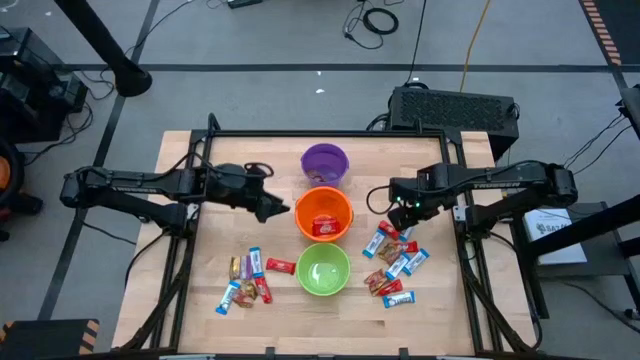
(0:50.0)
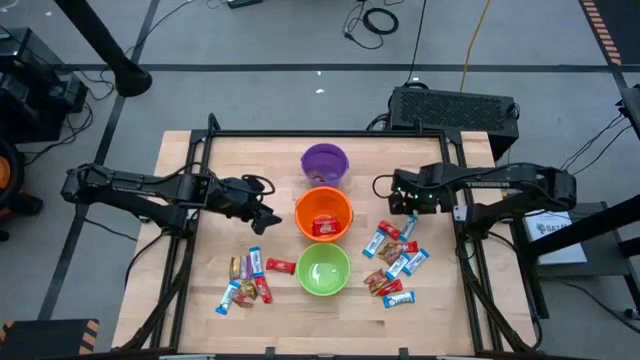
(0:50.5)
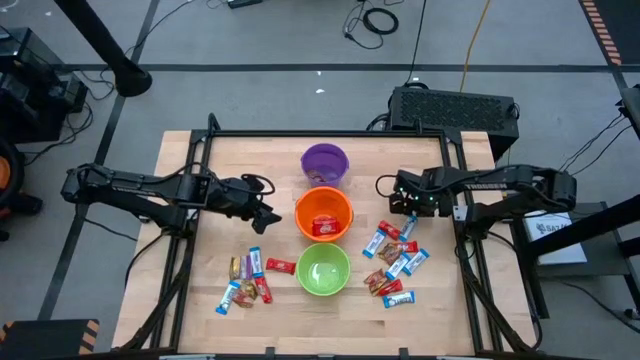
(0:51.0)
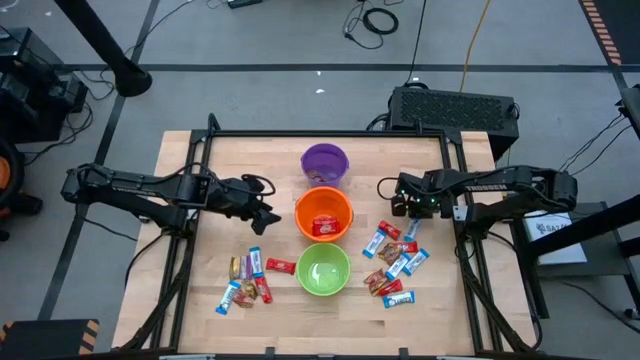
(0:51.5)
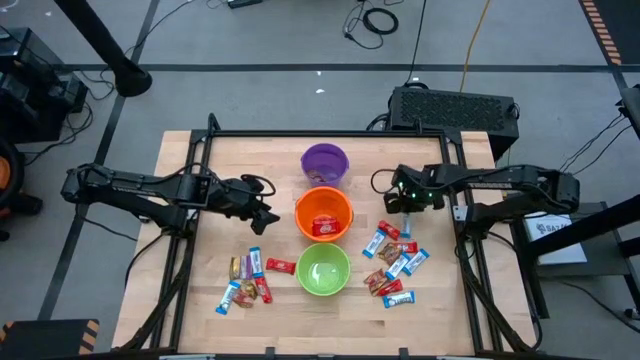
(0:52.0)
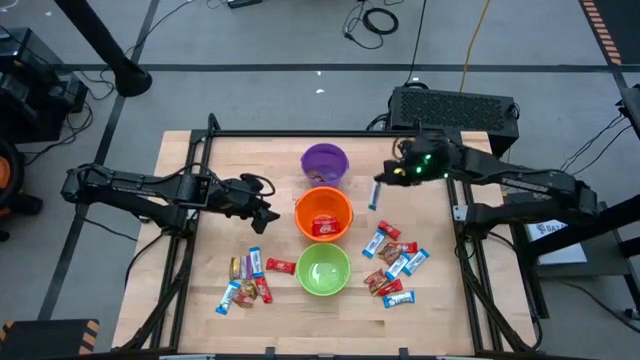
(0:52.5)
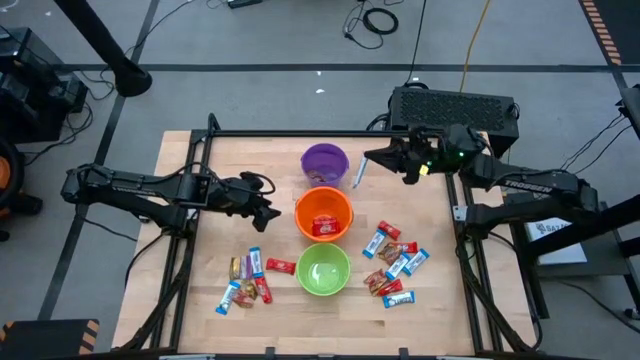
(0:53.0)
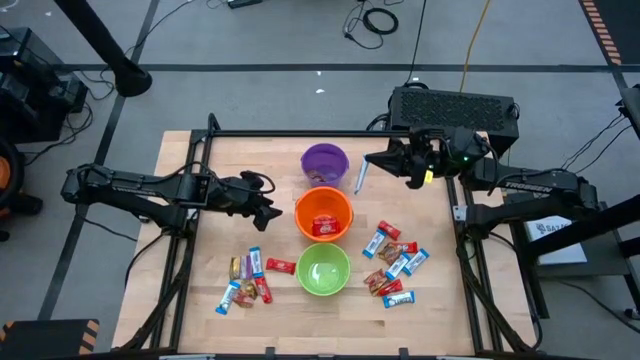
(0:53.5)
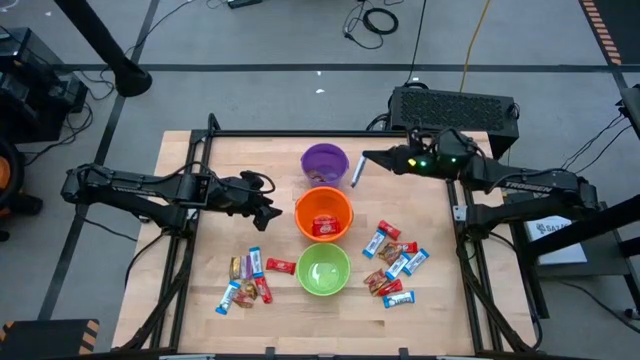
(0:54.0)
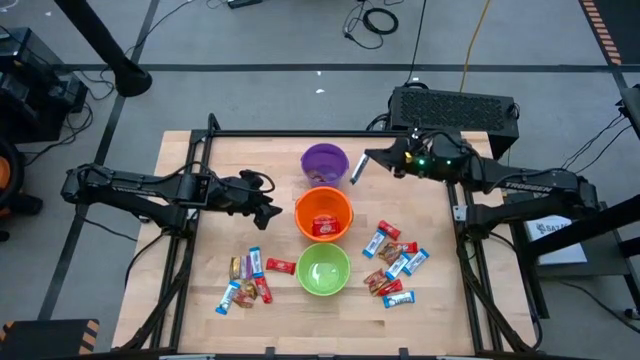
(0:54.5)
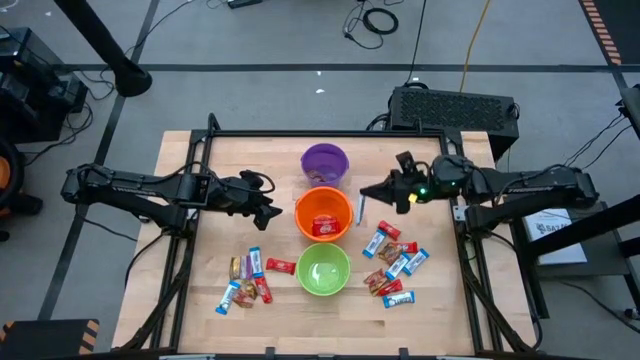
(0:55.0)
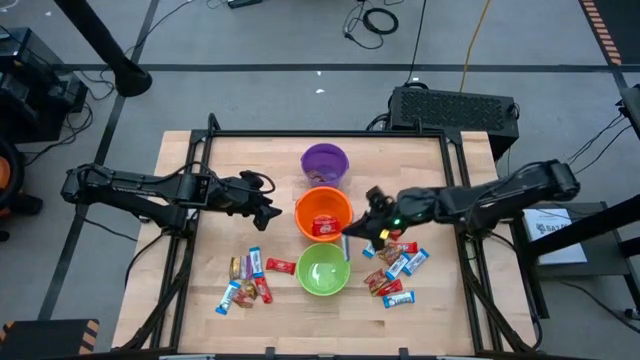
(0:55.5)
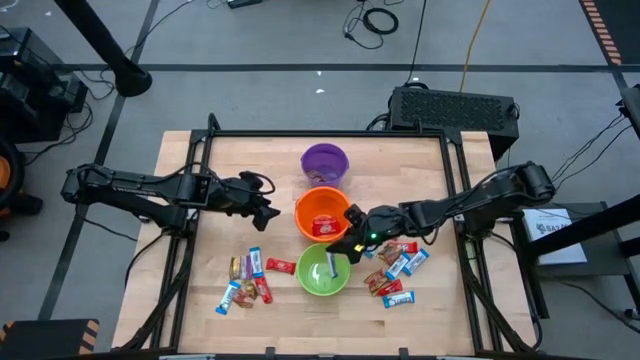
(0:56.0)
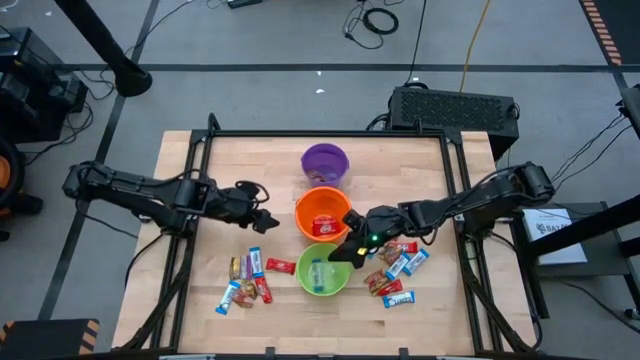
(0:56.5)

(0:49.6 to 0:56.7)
Task: Sort candy by brand, put in halloween buckets
Put blue chocolate bar into the green bucket

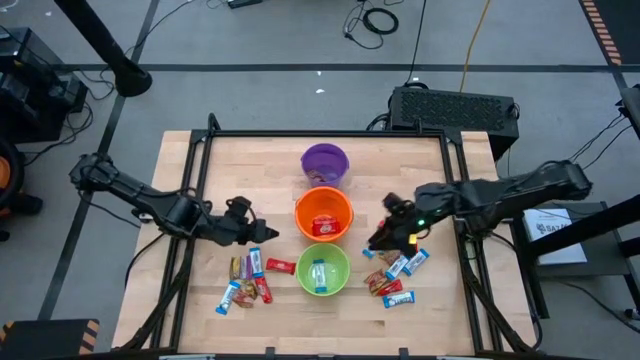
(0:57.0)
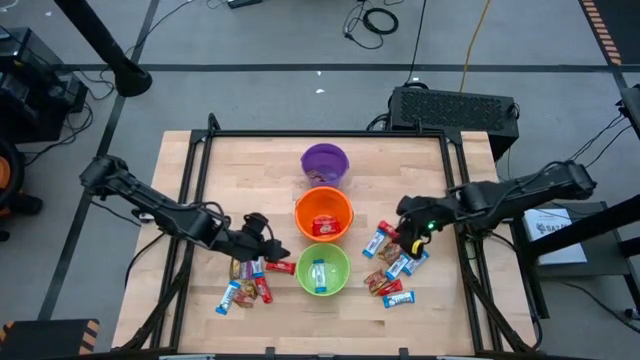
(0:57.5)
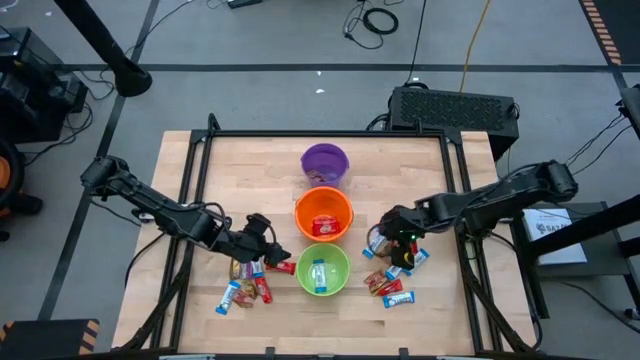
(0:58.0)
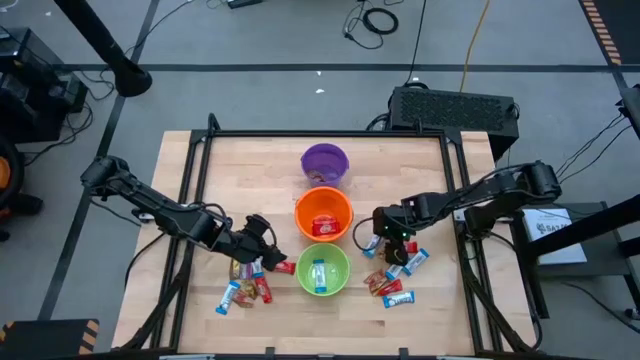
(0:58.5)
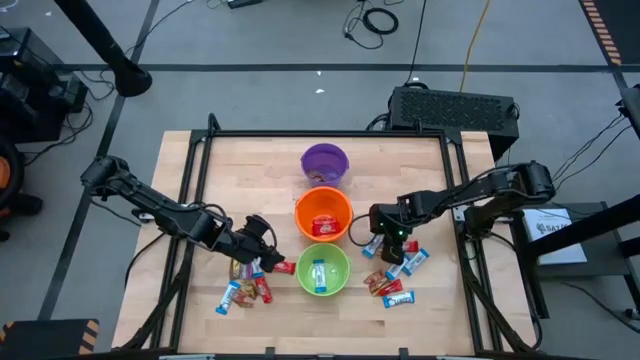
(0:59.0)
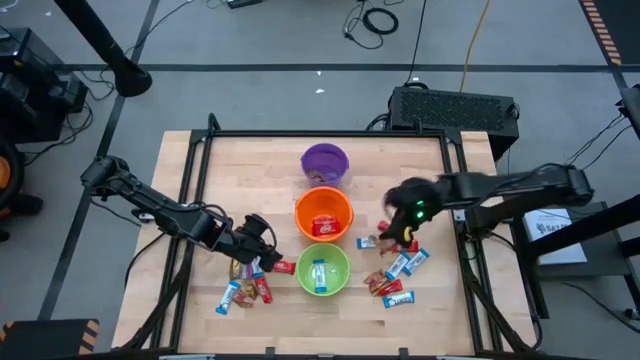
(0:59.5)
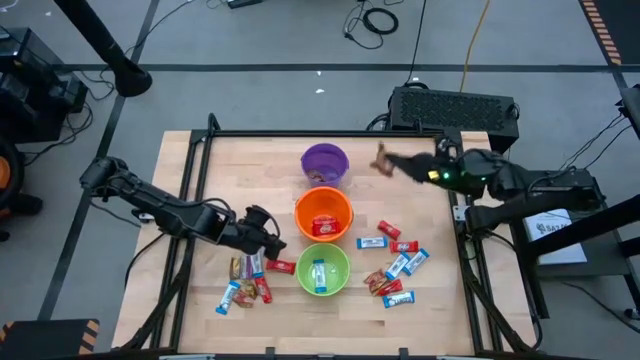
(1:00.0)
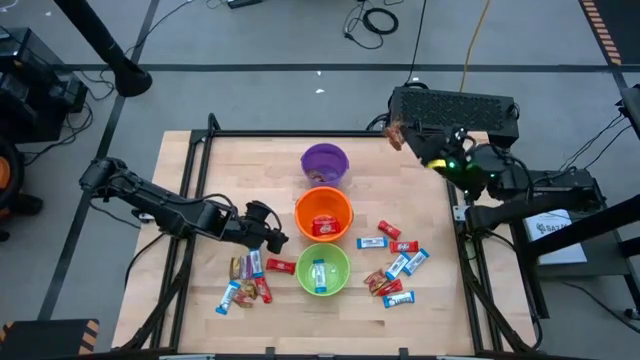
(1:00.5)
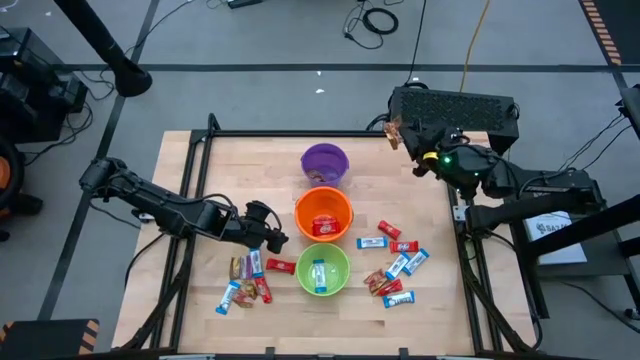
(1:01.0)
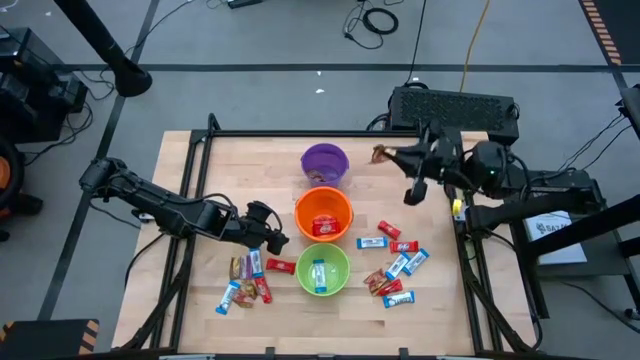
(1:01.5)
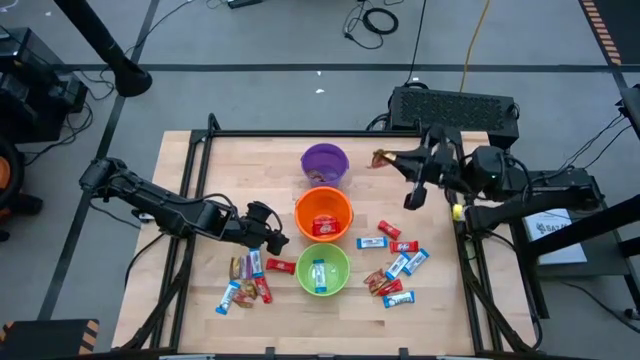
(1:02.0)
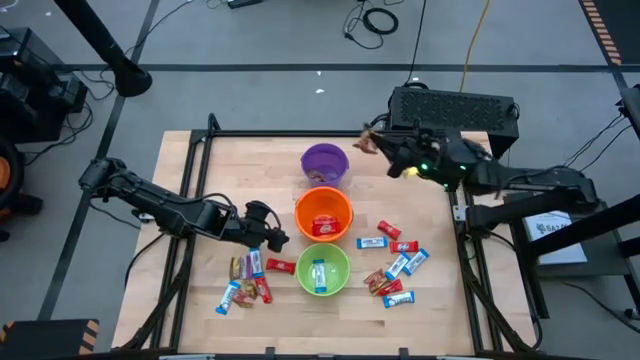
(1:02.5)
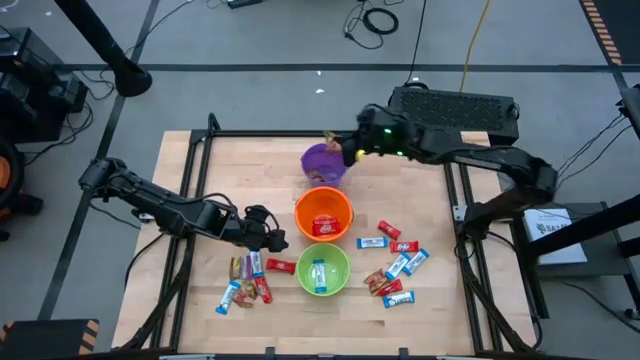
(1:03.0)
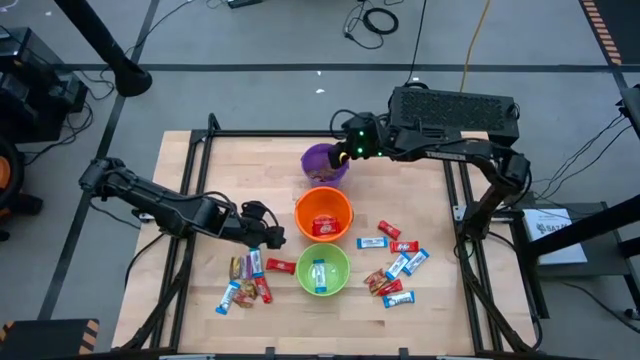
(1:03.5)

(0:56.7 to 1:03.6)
Put golden candy into the purple bucket

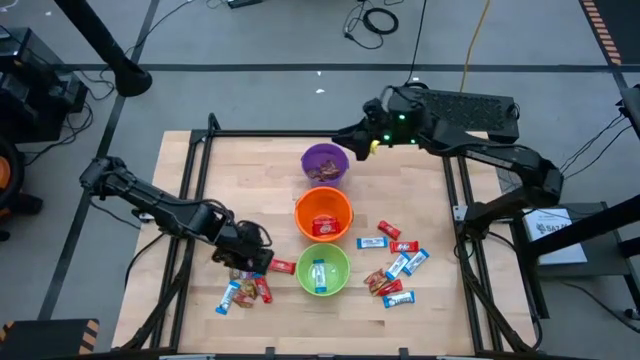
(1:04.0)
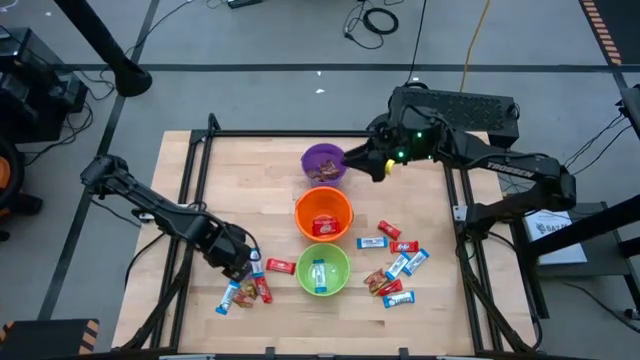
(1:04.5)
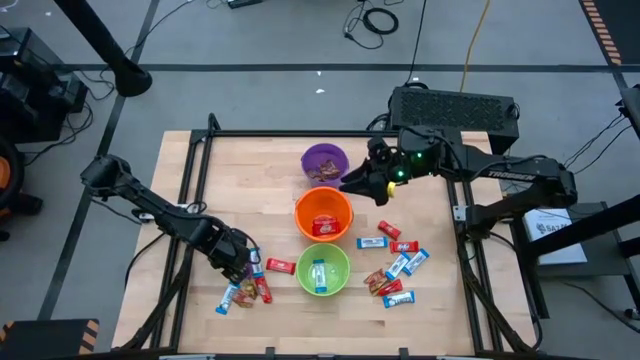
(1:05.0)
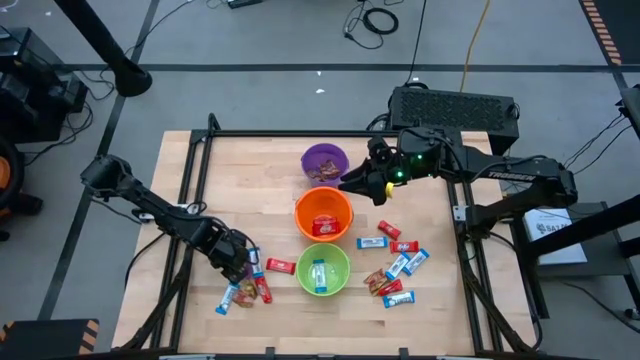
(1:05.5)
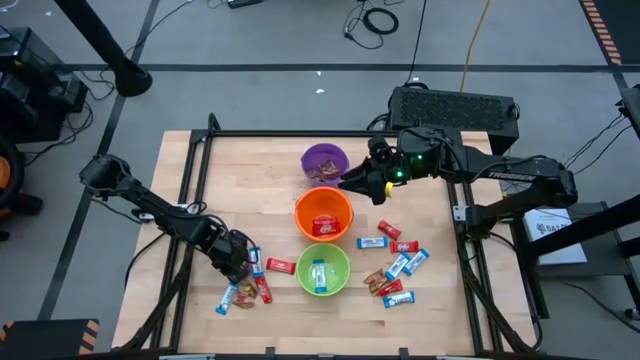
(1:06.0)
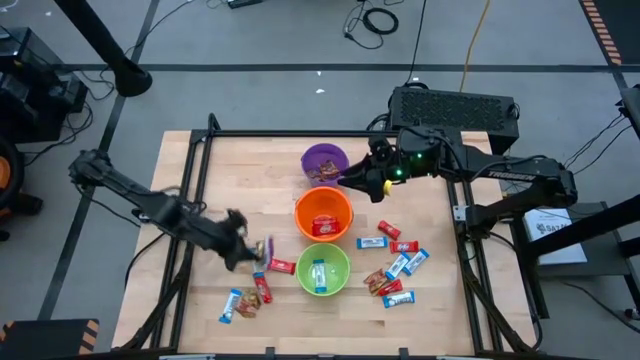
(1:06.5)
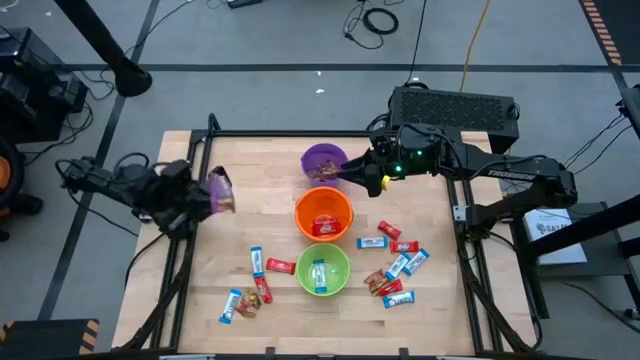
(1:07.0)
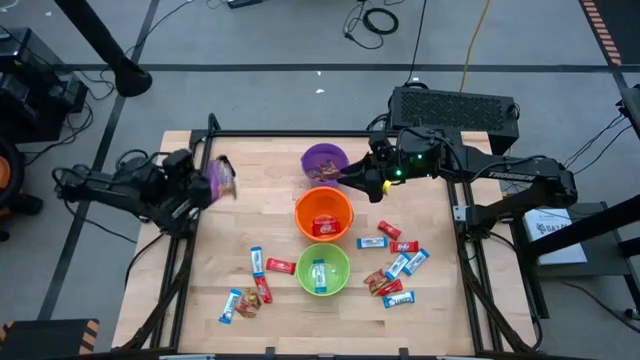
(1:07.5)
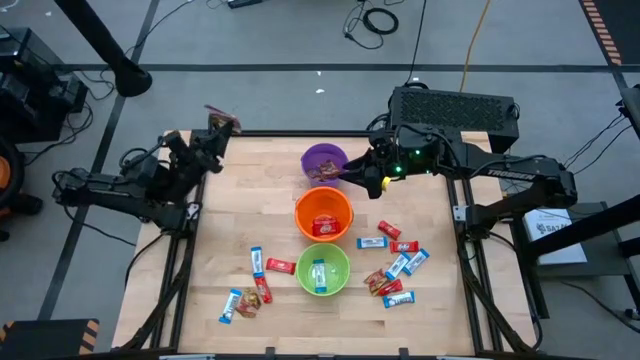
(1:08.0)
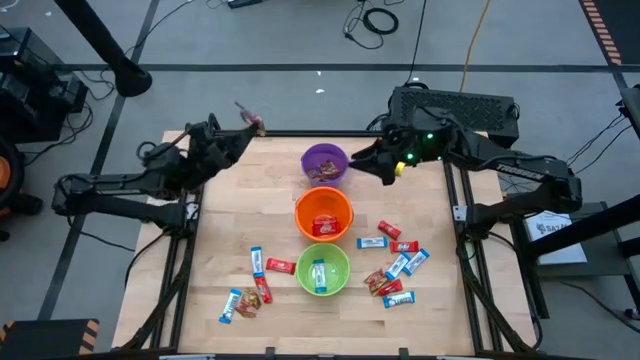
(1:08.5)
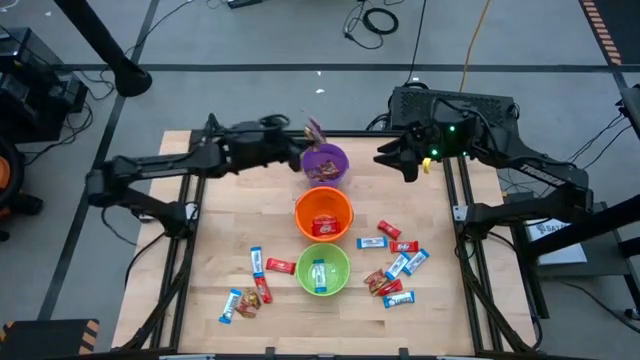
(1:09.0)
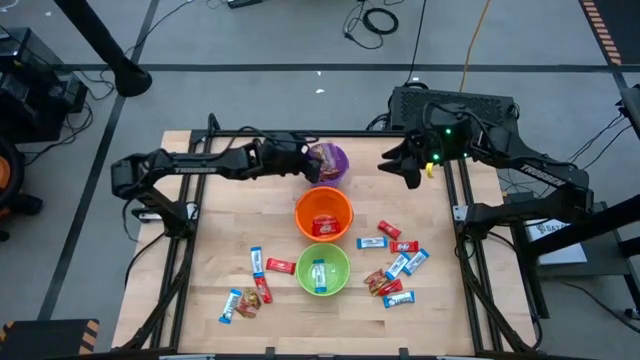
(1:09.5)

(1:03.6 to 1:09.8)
Put golden candy into the purple bucket

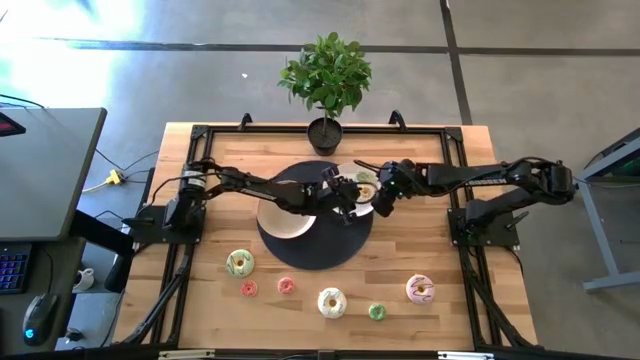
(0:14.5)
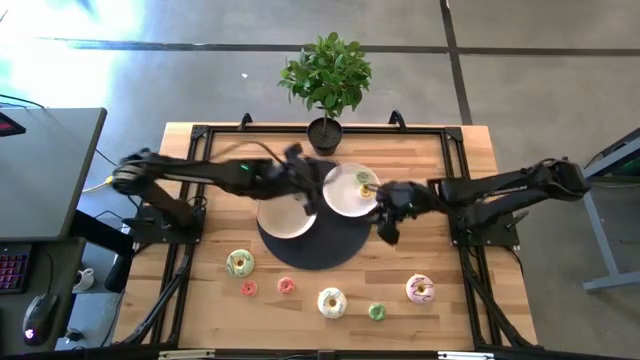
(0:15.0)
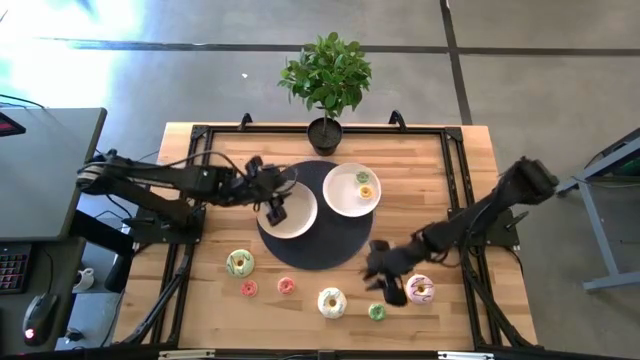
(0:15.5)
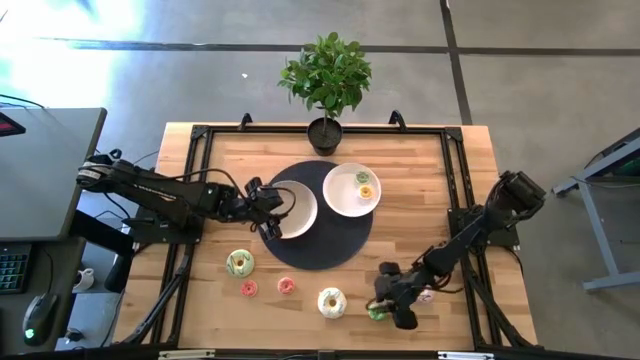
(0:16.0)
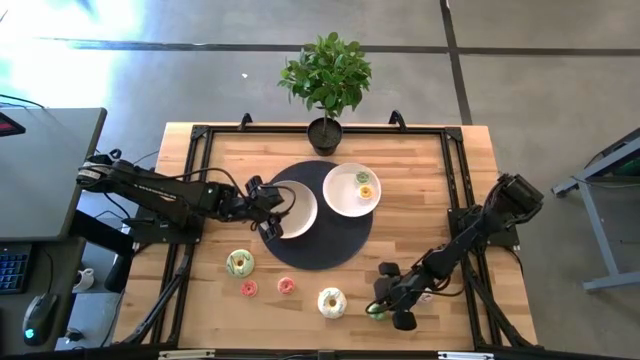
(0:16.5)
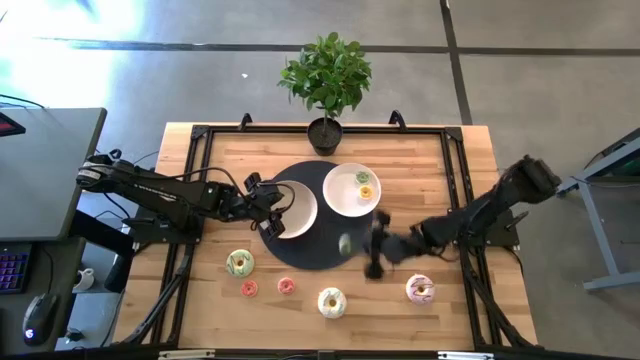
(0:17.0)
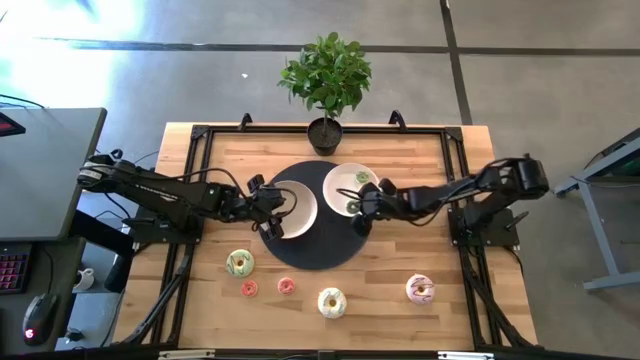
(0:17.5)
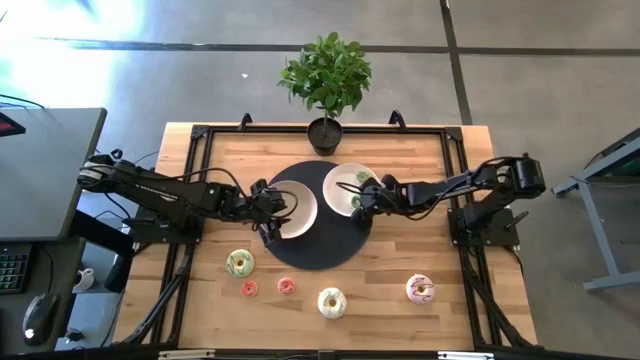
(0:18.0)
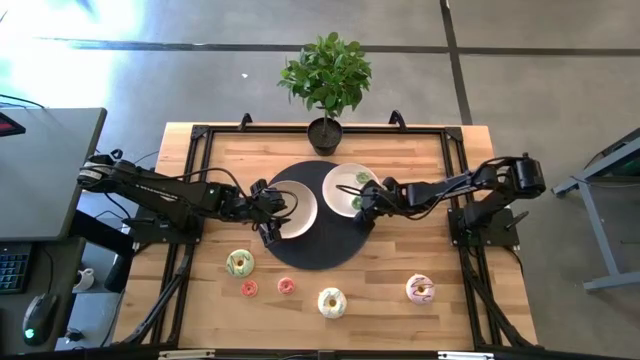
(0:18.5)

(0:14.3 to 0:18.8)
Task: Pick & Place donuts
Put the small green donut on the right white plate
